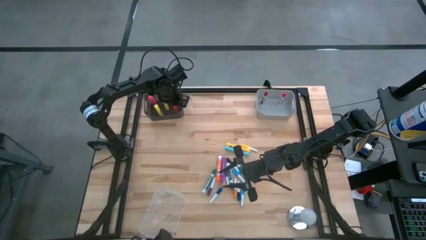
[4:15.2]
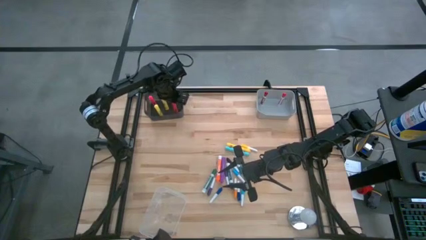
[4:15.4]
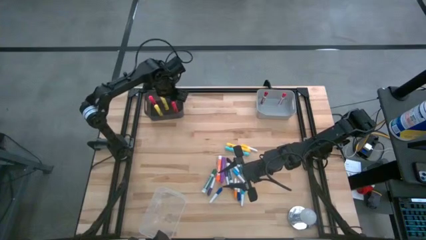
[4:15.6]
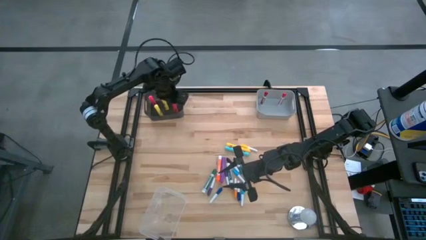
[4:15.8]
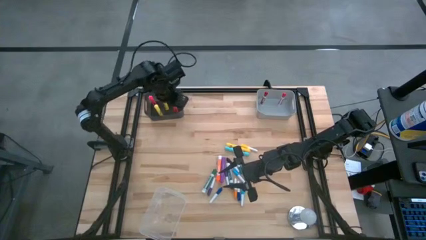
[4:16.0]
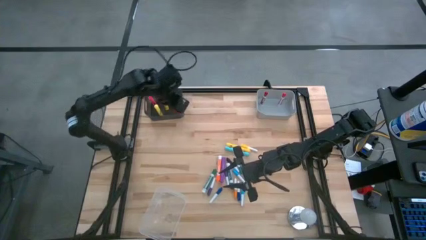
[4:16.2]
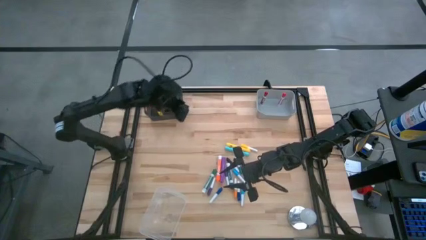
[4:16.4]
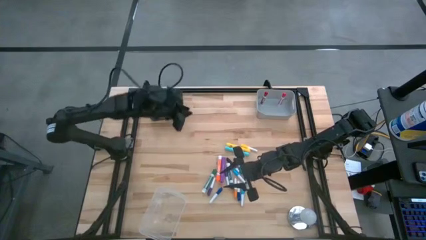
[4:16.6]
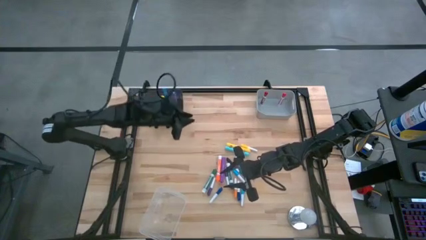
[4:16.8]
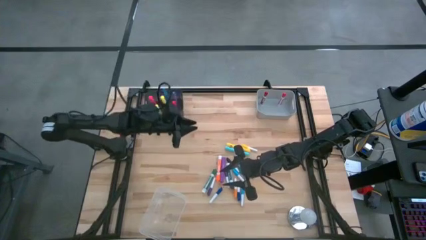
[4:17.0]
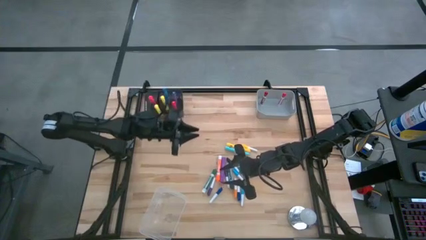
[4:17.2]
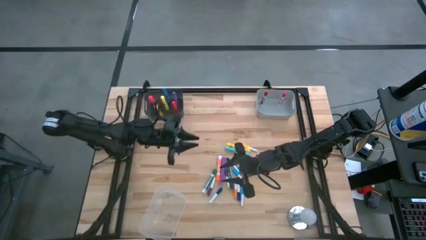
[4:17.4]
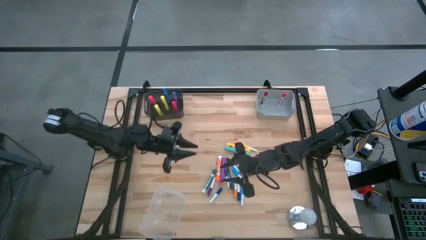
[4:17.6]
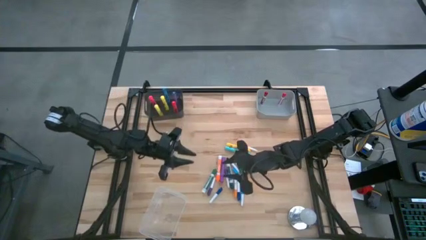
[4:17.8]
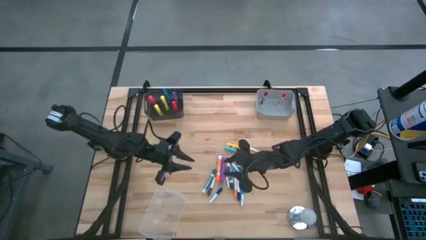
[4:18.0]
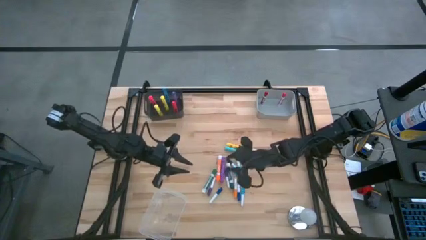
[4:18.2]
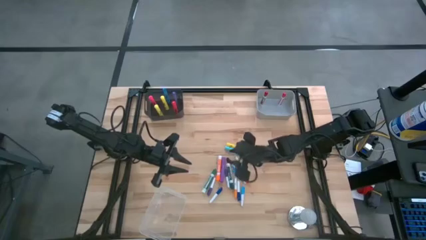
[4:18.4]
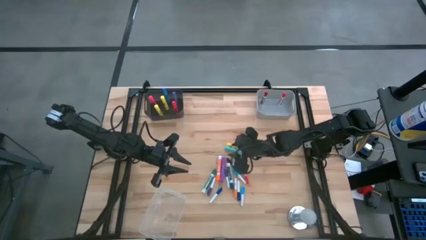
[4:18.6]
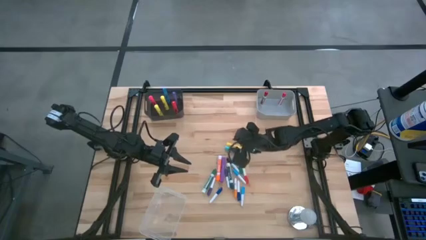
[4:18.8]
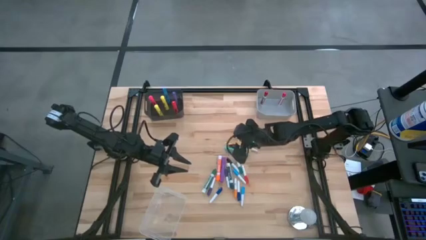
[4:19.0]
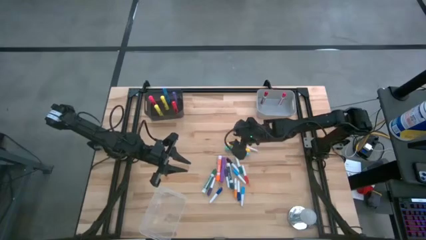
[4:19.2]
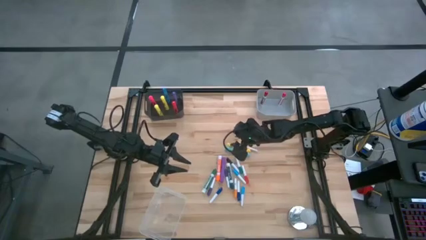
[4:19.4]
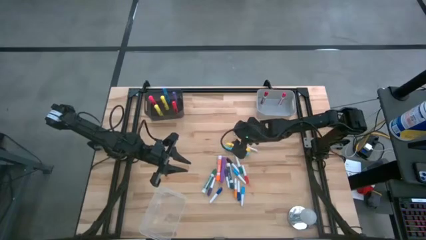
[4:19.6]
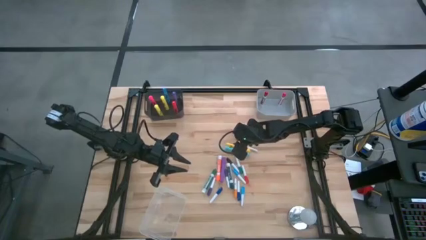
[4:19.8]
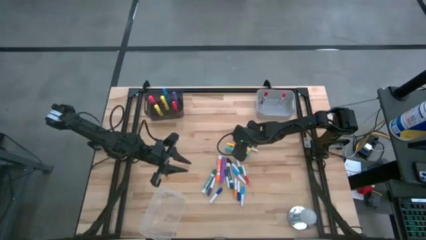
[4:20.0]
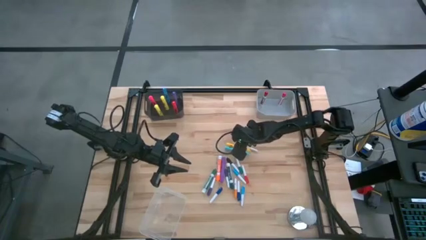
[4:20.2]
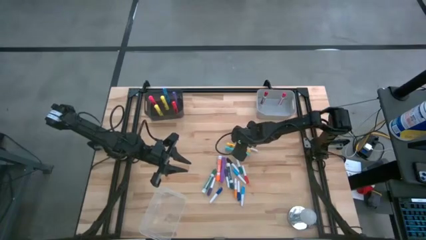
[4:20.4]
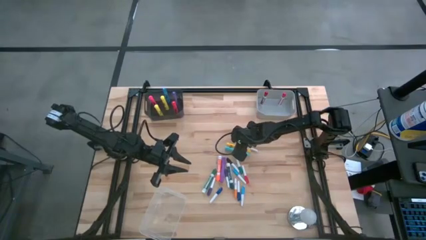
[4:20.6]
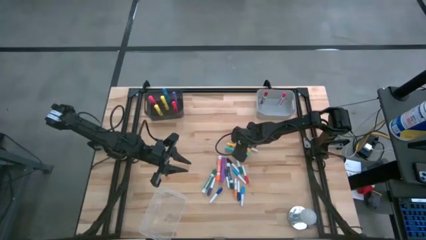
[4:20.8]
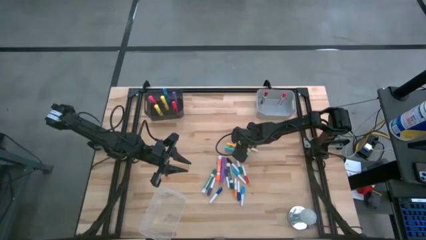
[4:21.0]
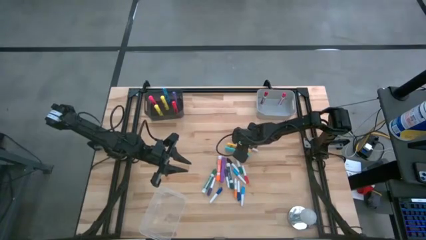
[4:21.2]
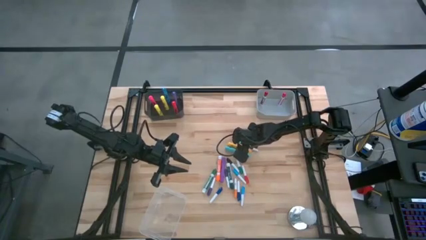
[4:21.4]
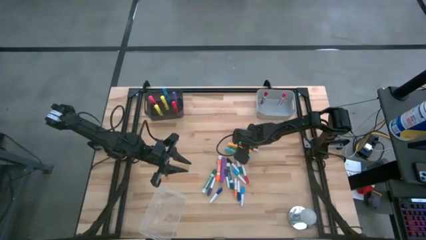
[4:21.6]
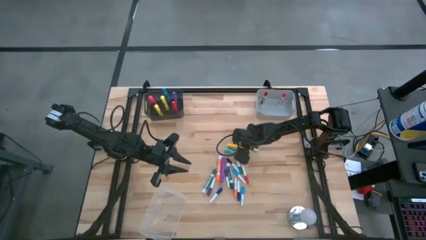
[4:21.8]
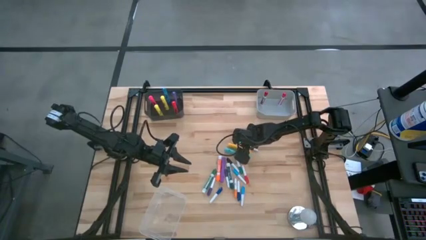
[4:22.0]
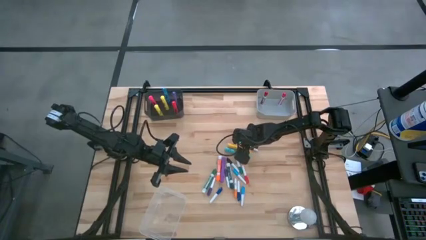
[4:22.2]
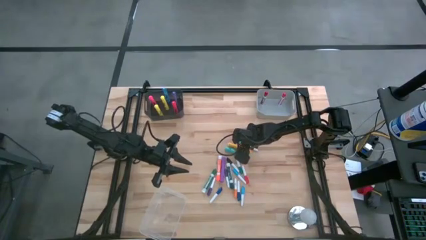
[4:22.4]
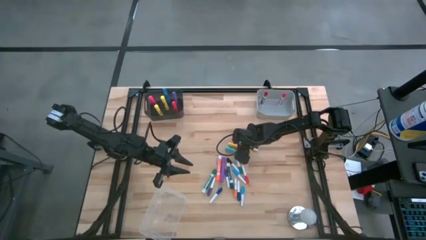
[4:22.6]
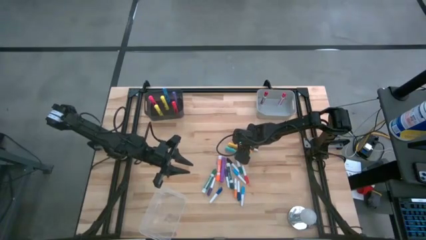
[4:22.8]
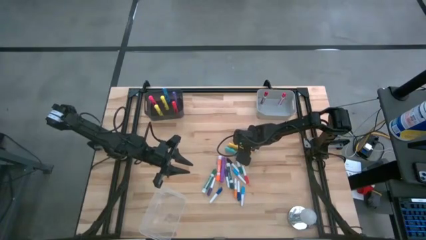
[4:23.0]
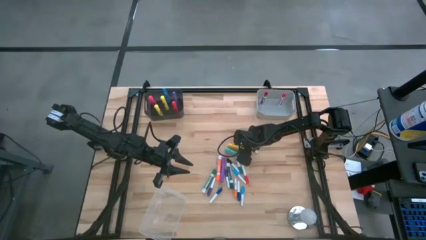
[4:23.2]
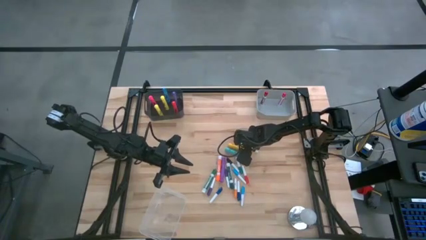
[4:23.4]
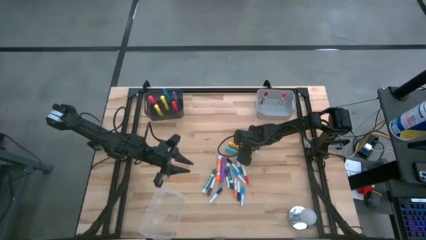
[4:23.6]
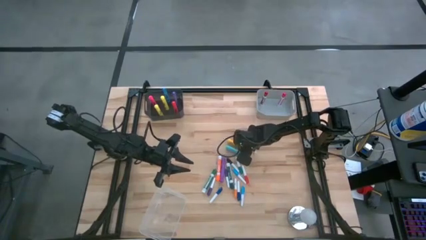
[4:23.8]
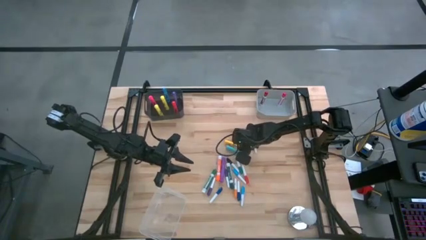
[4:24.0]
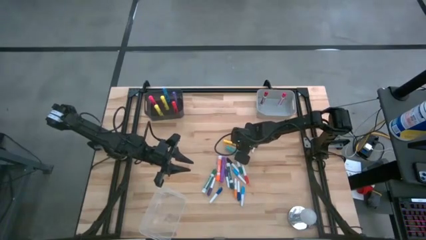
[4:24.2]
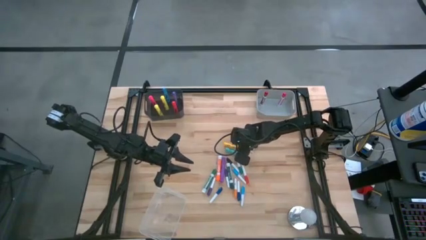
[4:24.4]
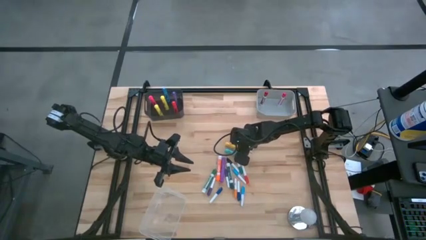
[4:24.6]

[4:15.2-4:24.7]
Task: Pick & Place Markers
Put the yellow highlighter pen into the black bin

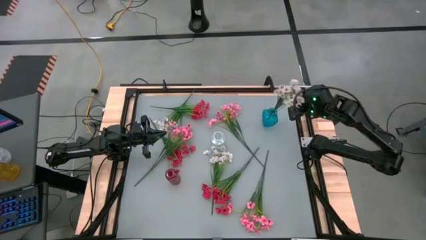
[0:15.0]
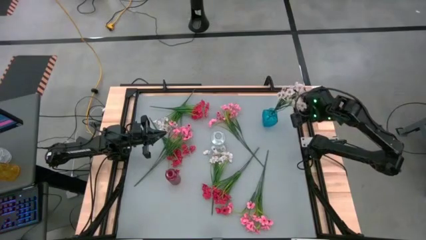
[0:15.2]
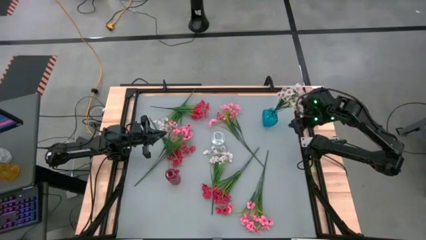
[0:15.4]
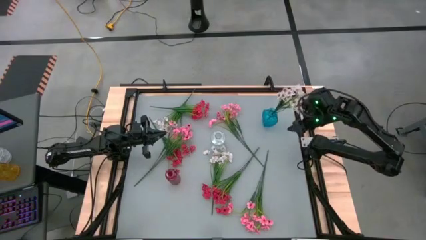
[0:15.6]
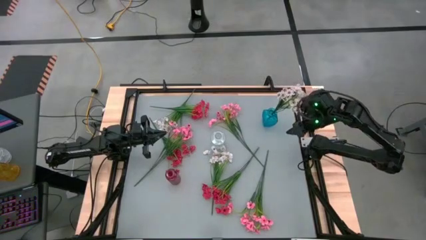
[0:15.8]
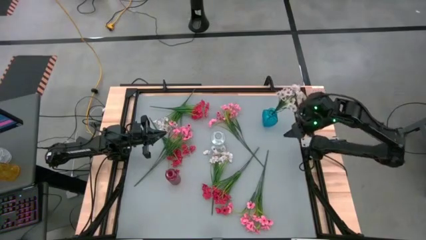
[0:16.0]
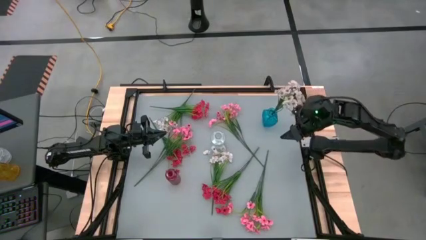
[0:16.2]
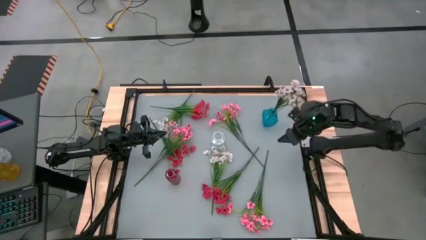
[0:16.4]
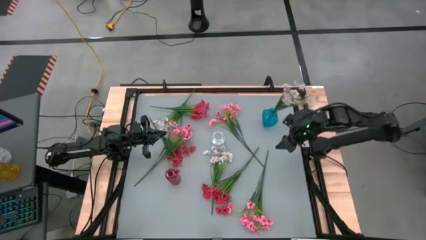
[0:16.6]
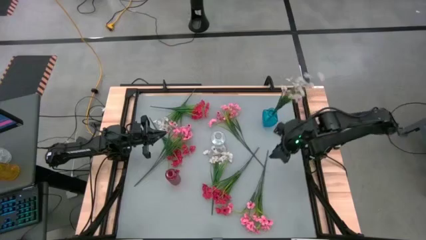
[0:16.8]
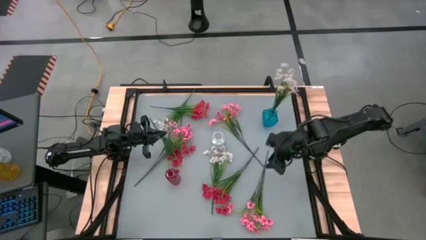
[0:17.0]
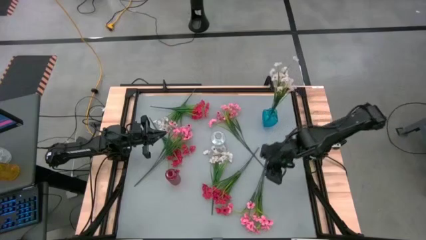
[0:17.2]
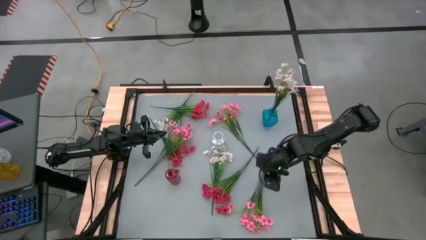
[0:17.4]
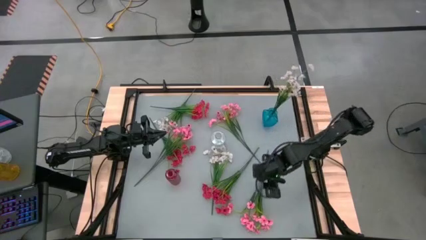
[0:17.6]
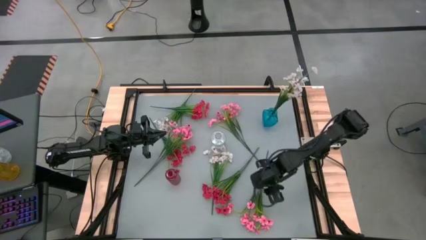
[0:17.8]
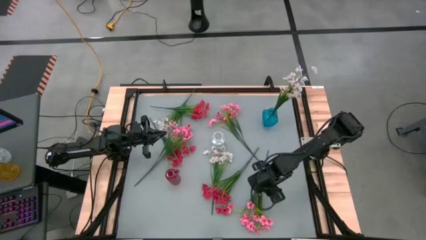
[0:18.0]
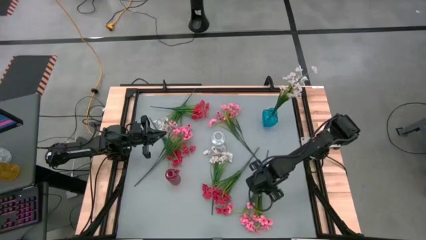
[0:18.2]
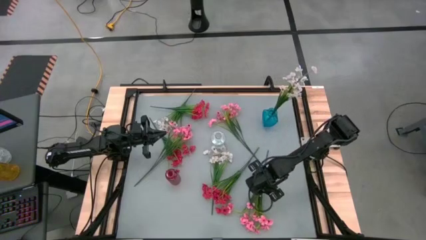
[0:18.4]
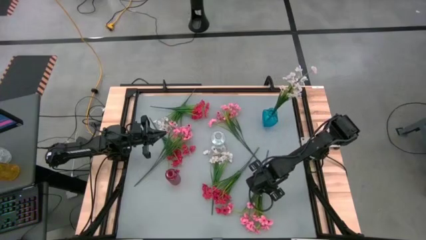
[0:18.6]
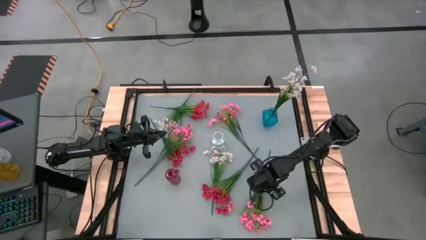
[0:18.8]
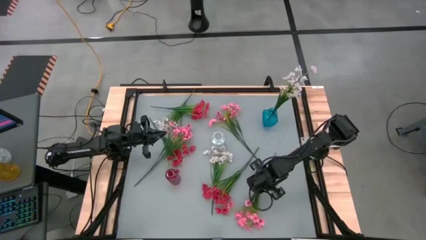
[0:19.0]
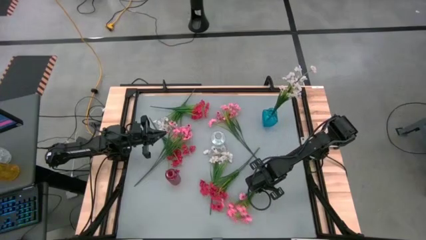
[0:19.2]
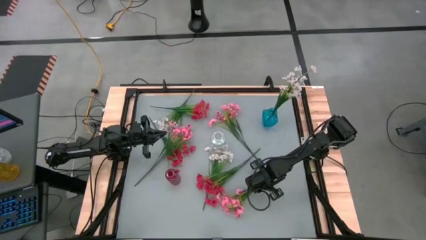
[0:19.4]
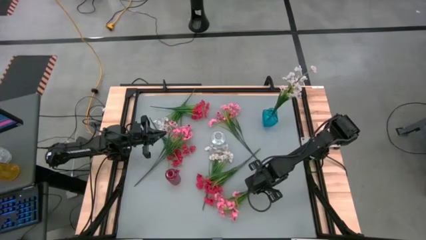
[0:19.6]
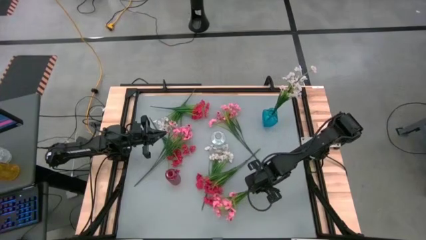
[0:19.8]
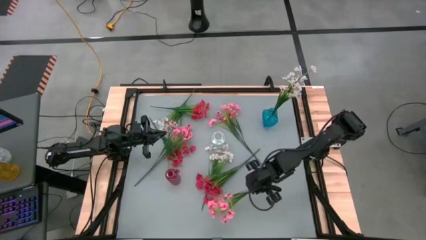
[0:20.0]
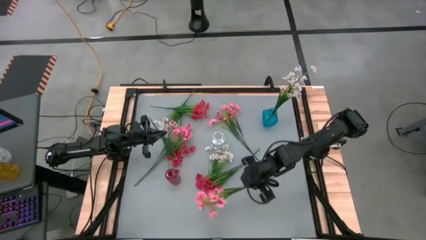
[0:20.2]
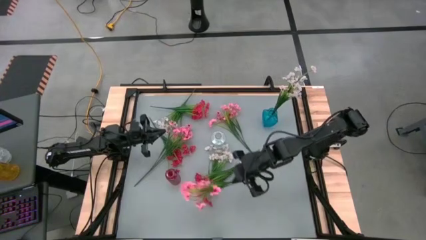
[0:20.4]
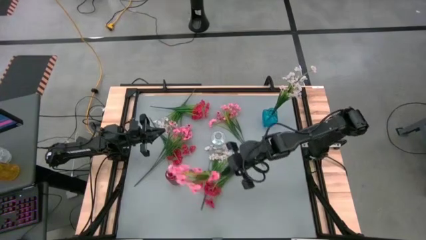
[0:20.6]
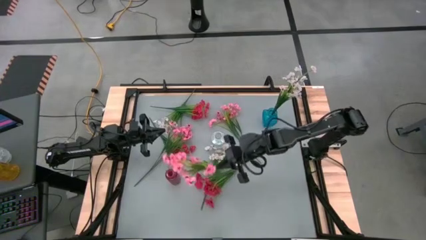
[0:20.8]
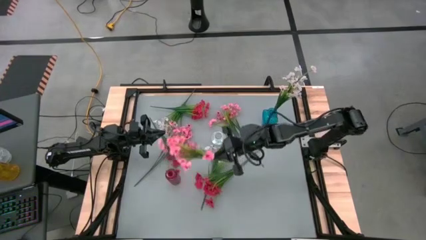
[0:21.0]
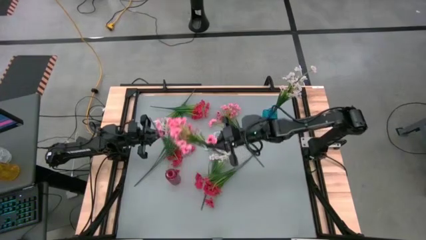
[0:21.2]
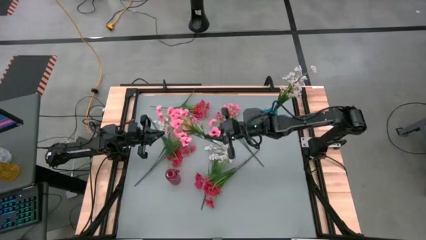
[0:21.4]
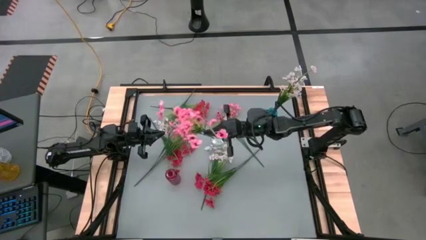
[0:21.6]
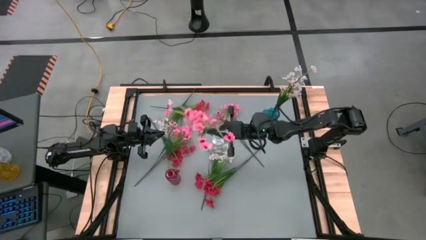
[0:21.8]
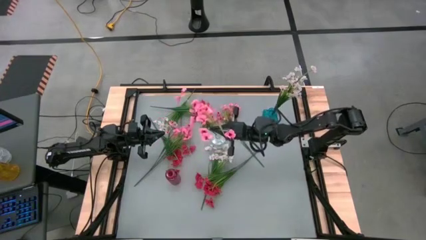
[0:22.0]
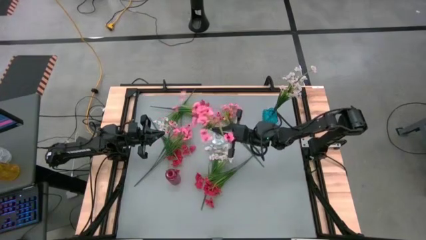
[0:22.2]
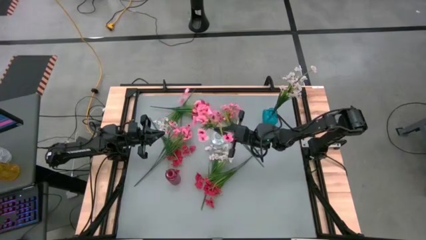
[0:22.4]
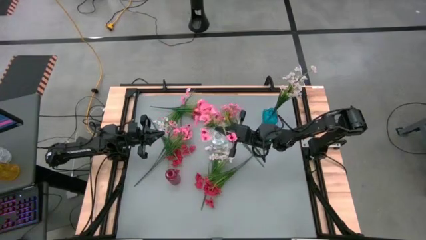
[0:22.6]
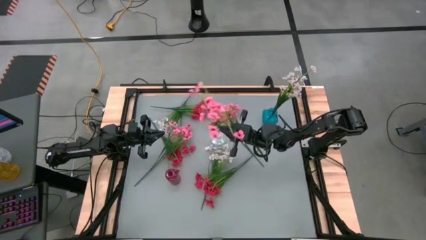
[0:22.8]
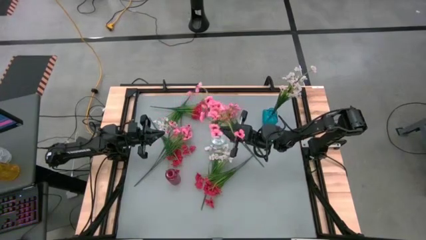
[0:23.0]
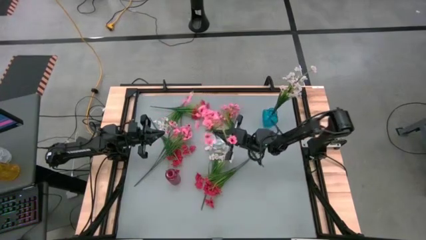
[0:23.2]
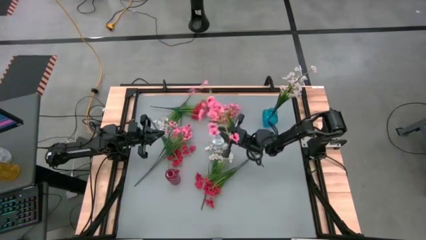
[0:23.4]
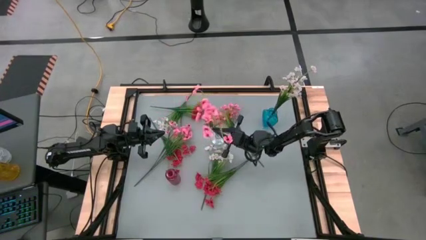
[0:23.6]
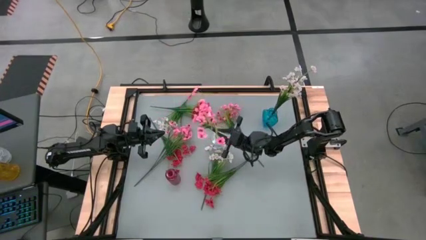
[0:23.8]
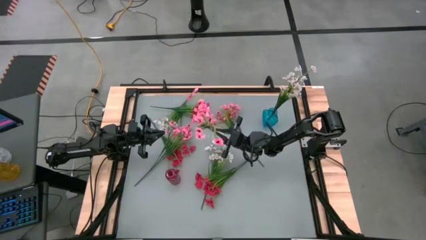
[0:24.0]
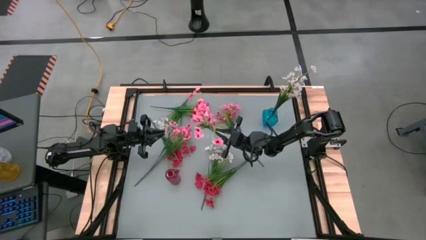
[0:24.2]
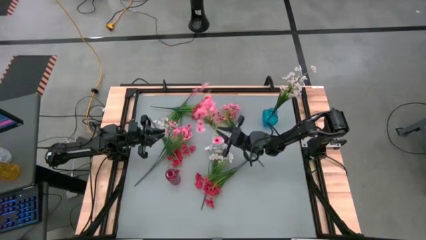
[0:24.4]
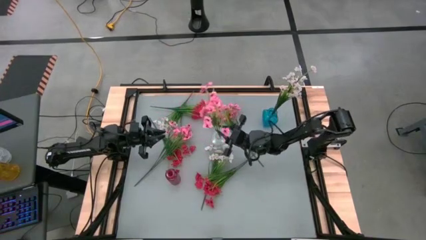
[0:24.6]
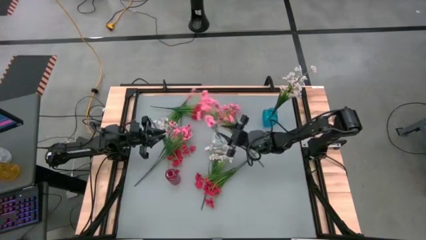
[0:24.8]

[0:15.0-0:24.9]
Task: Sort flowers into vase by color
Put the bottom pink flowers into the transparent vase
